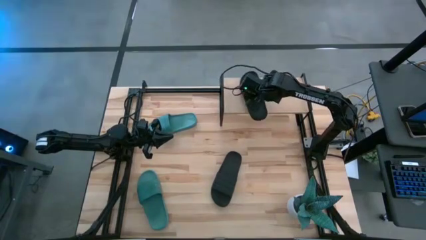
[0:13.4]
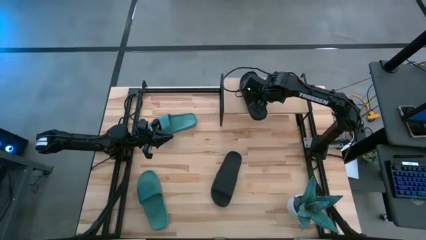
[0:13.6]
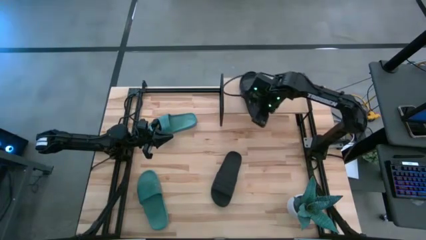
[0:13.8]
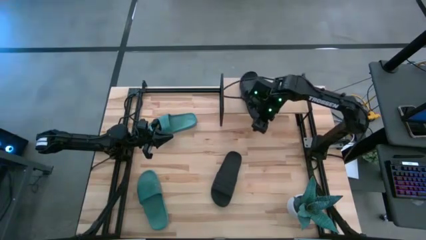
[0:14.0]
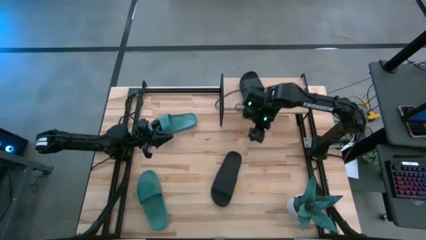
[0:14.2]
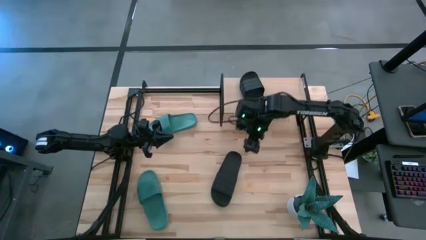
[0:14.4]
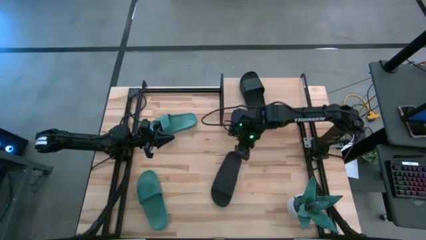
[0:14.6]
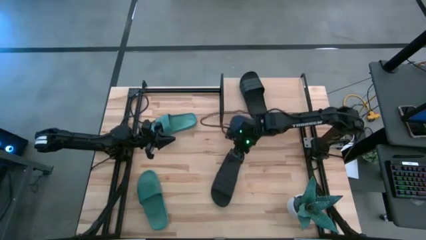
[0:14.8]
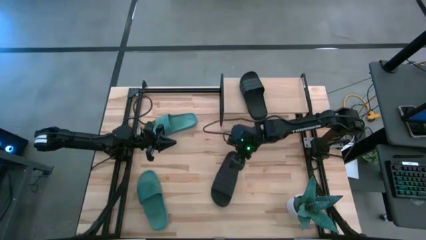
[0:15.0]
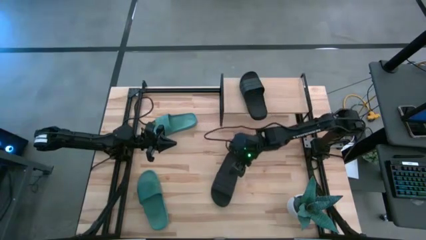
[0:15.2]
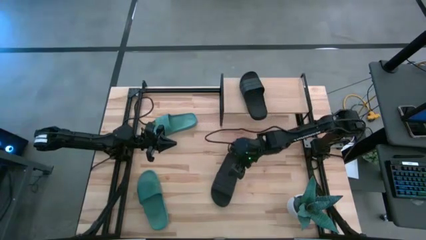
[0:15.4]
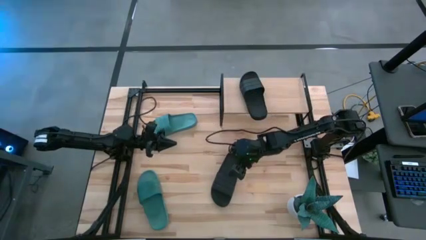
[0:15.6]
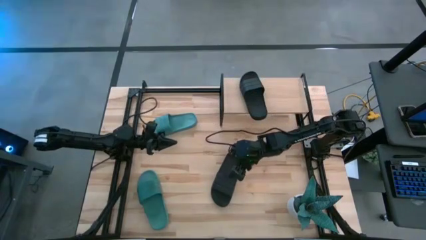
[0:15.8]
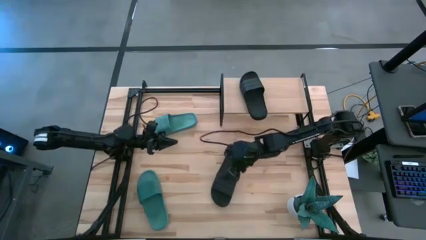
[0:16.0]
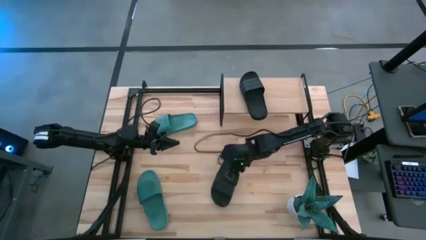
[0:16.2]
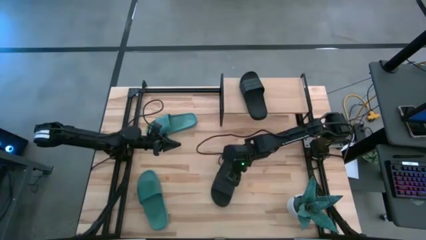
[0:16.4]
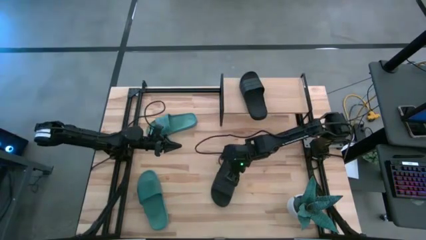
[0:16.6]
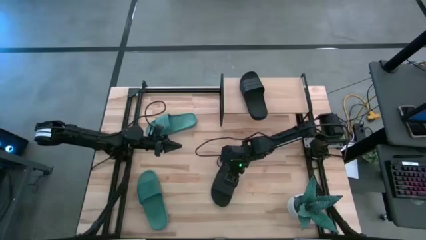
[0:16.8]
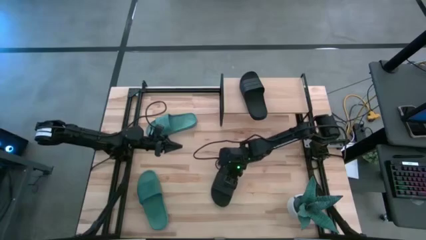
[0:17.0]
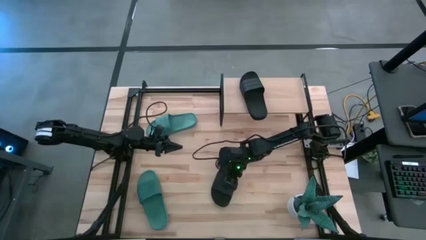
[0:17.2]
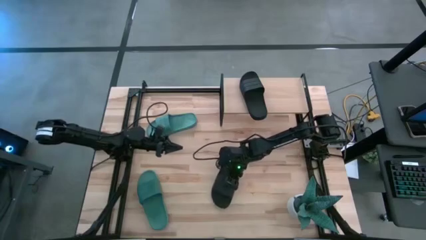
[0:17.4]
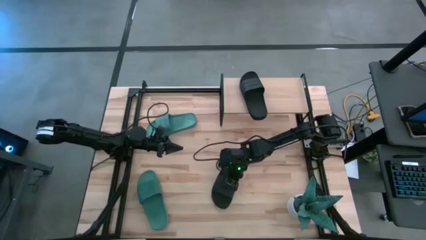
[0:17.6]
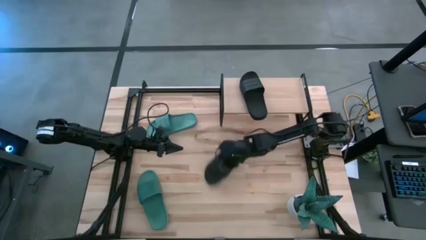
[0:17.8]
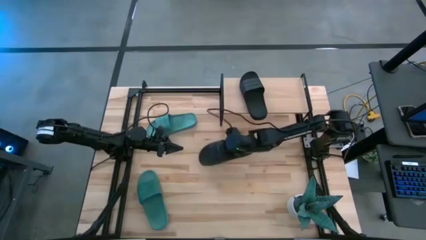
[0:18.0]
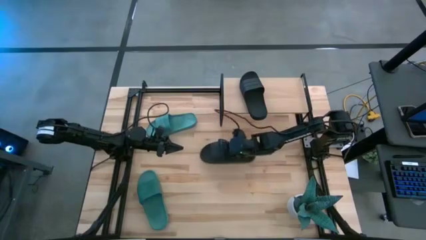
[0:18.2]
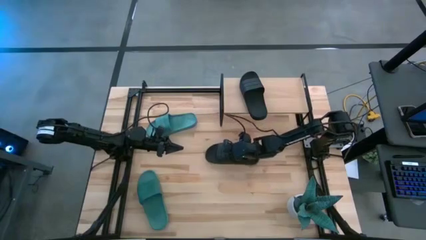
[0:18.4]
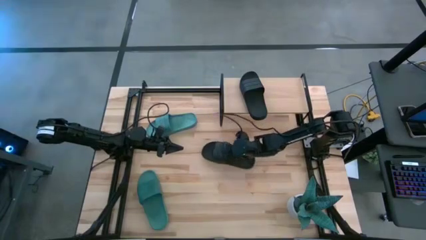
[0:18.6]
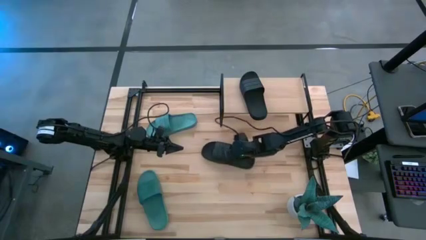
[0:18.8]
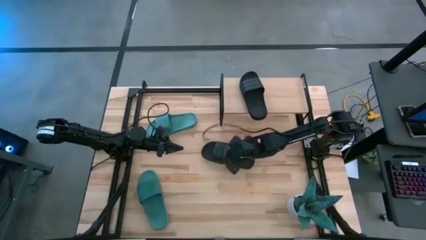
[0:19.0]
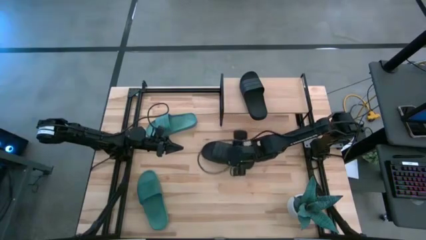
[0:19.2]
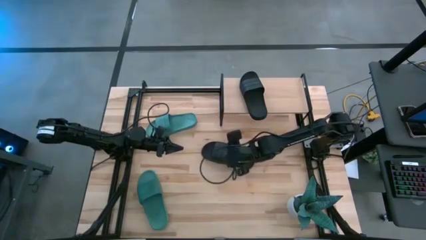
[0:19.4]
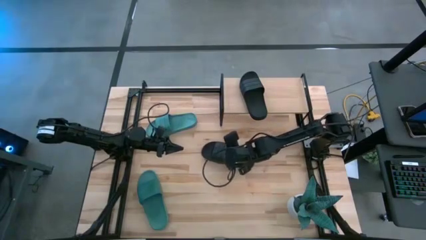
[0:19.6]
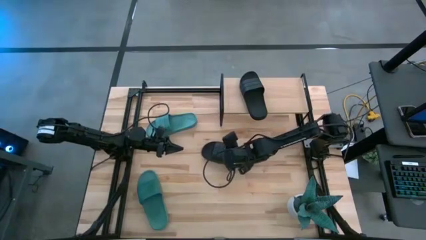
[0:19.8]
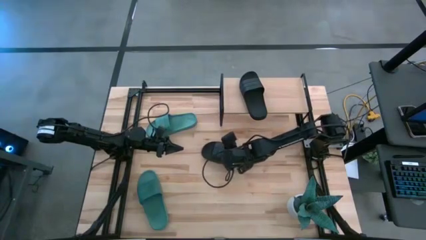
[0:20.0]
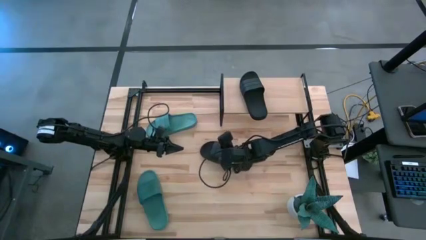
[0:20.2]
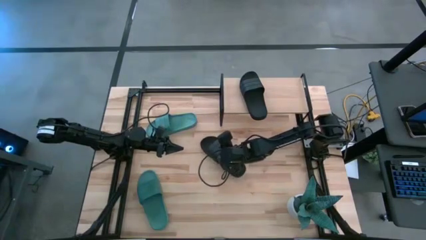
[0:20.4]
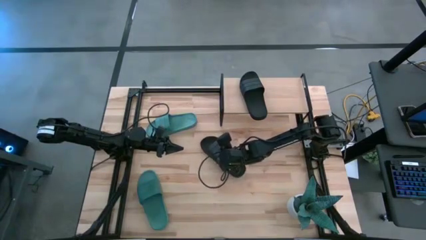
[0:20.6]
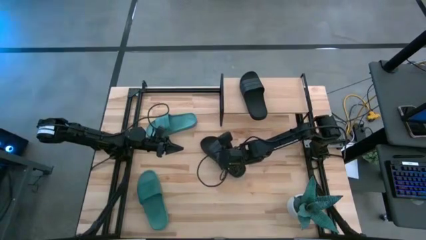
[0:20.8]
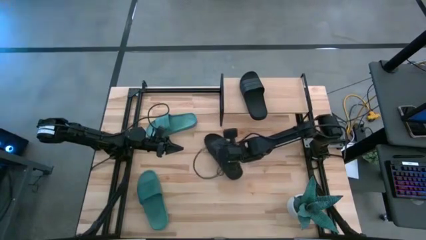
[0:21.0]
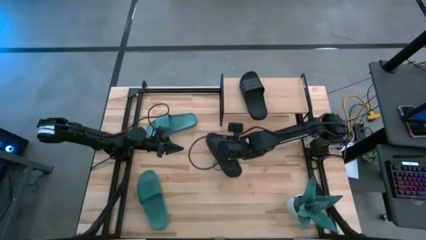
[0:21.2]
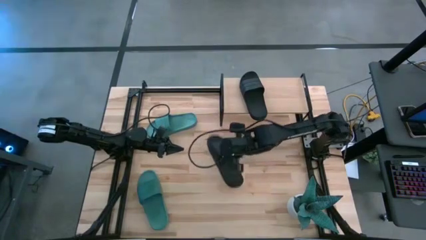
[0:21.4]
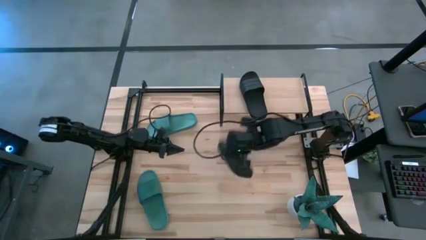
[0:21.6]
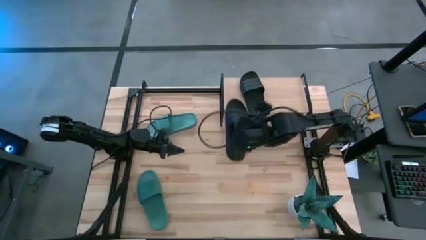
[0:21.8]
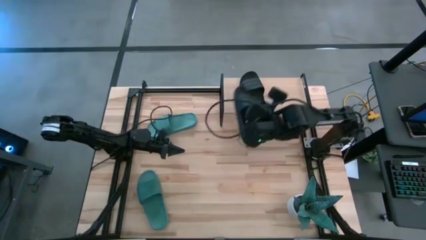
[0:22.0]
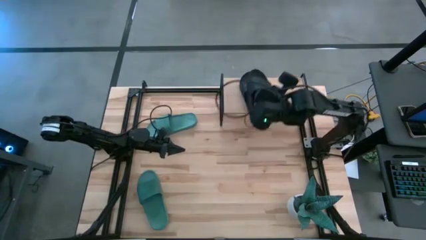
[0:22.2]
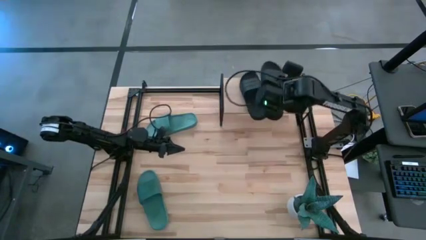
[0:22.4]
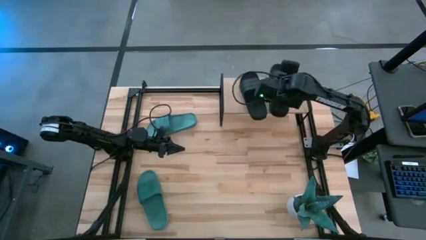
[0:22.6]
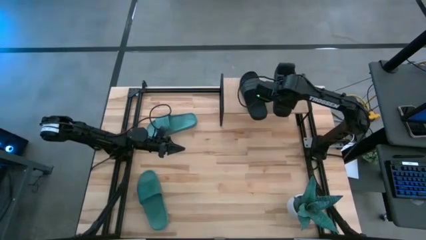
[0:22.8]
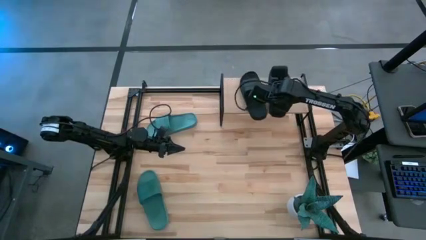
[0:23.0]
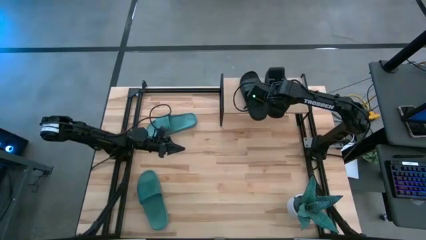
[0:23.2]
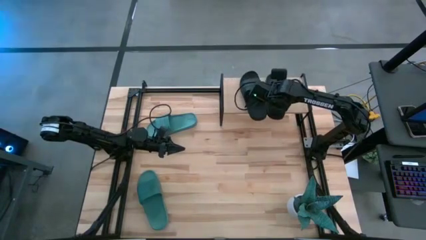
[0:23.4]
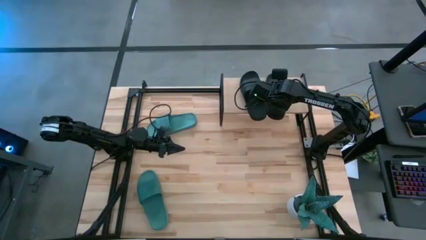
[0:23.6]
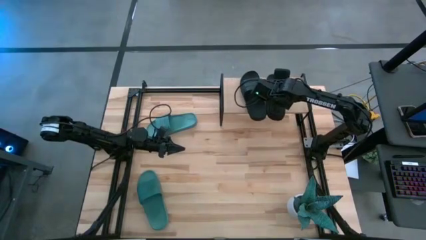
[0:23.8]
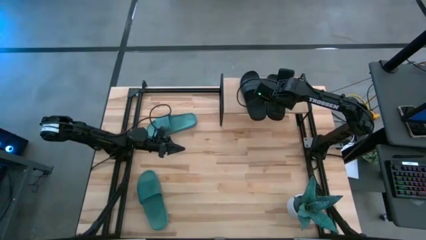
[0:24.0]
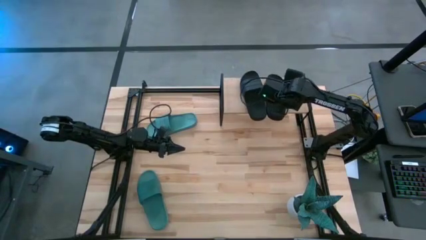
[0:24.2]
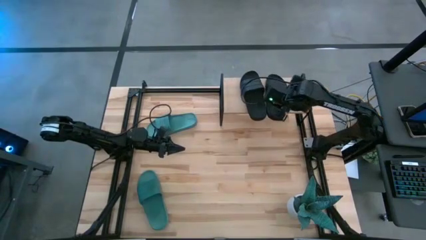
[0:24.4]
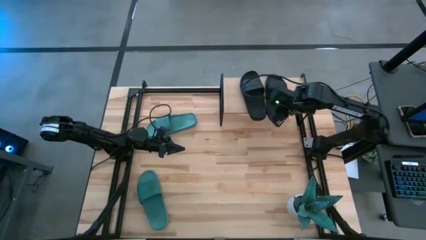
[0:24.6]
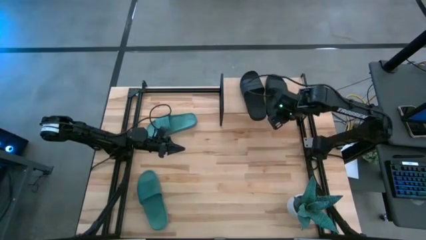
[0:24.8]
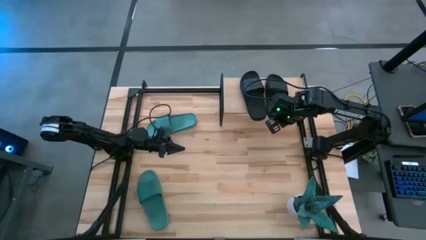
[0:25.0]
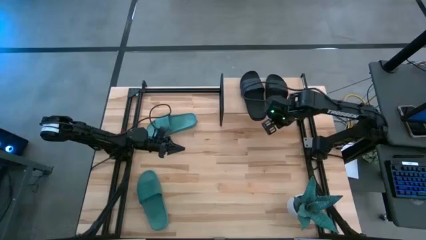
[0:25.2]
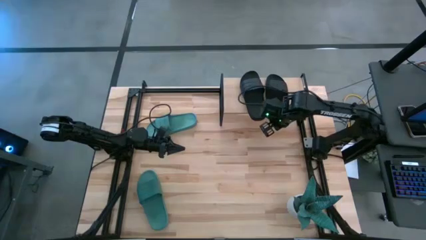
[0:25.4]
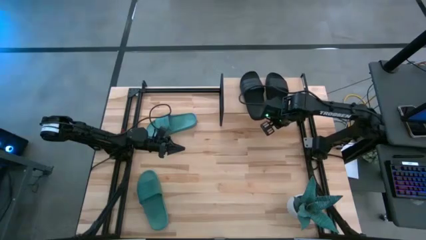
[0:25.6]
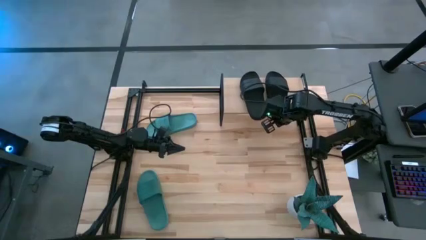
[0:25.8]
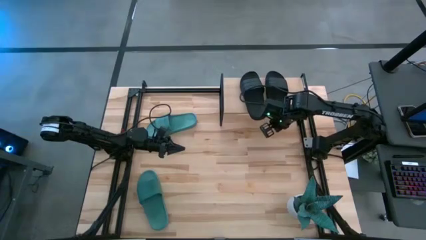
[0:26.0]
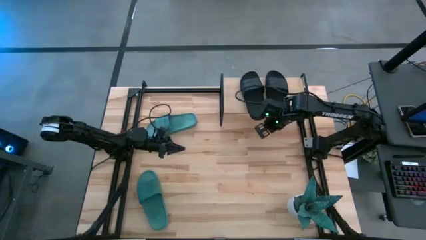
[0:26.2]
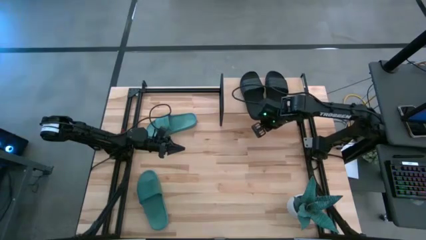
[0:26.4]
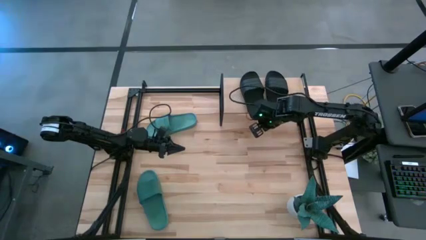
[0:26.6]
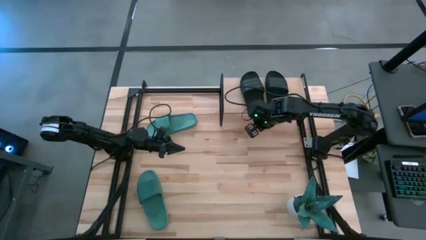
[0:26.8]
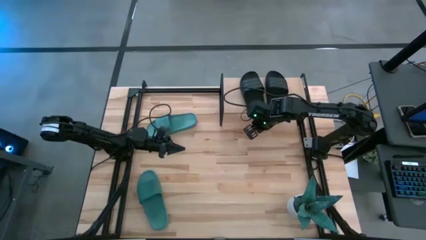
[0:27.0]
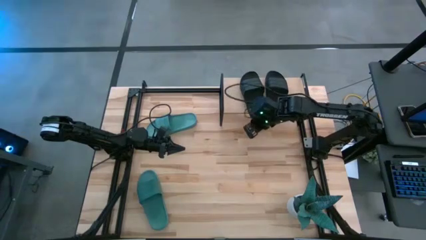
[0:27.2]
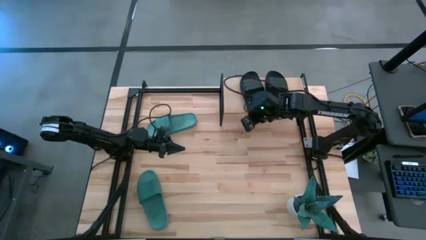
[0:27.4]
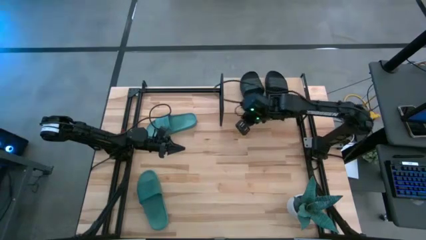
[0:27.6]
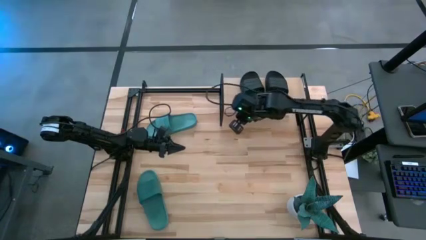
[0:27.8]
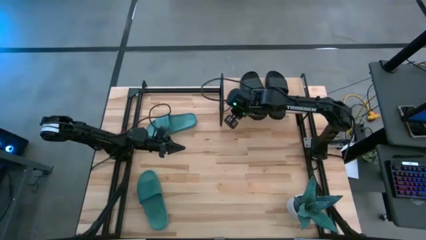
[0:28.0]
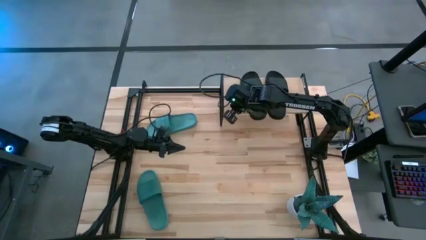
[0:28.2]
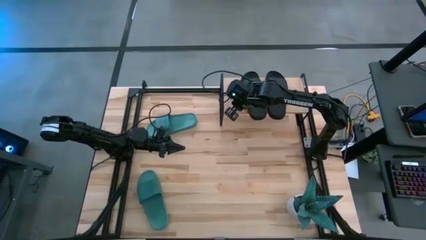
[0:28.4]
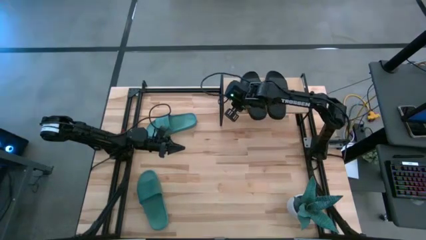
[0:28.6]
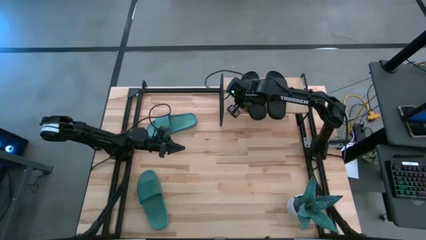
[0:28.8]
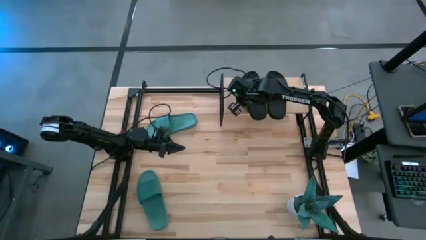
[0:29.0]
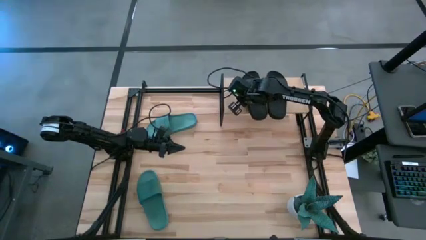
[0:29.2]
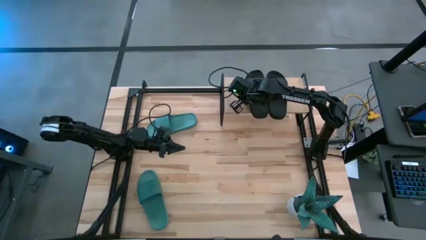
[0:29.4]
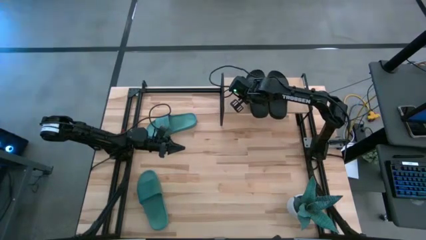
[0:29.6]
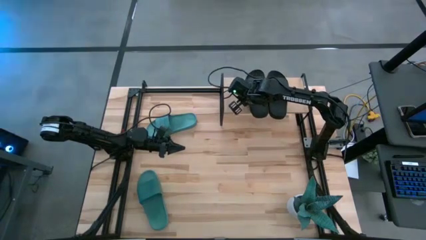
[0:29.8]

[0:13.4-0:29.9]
Task: Pick and place slides into the shelf
Put the black slipper on the shelf
